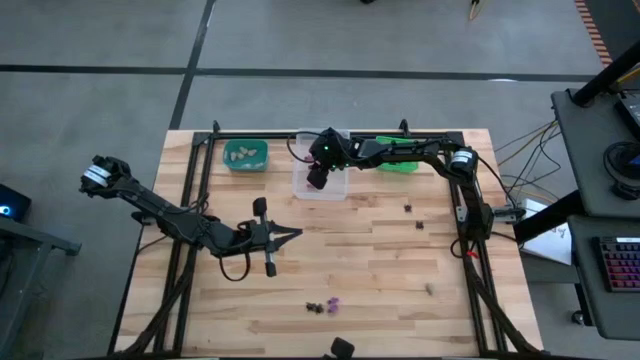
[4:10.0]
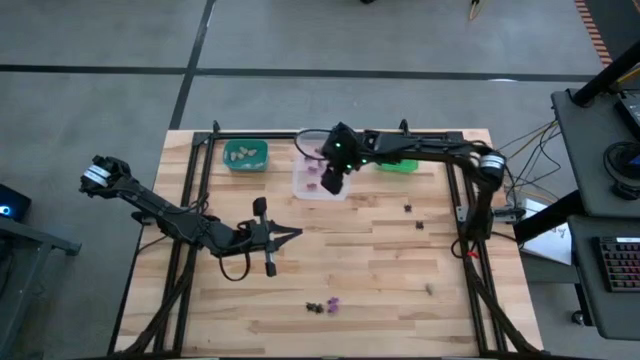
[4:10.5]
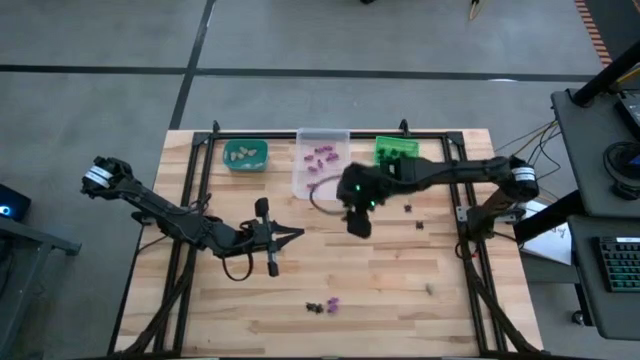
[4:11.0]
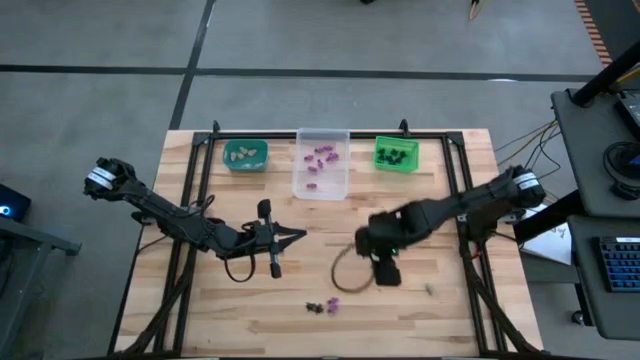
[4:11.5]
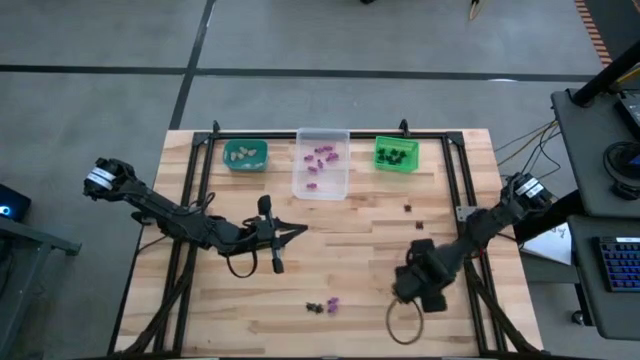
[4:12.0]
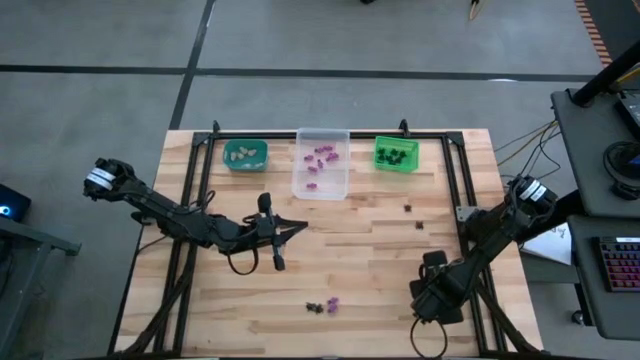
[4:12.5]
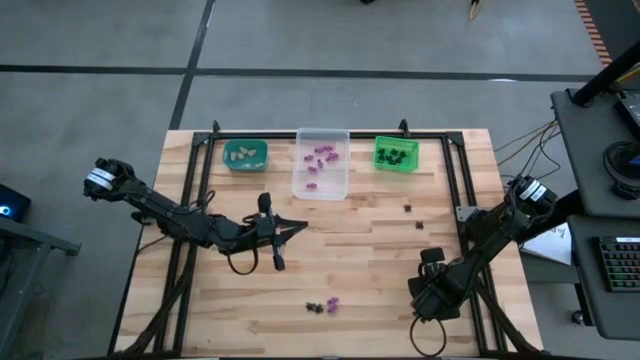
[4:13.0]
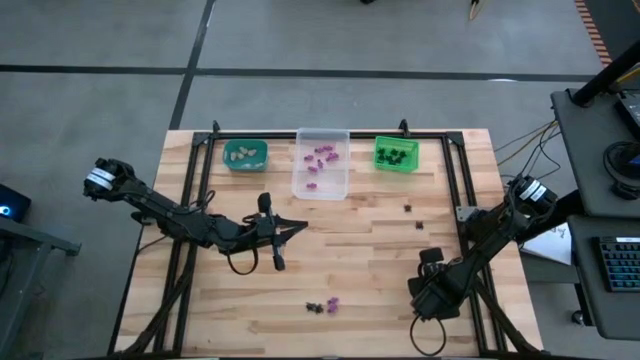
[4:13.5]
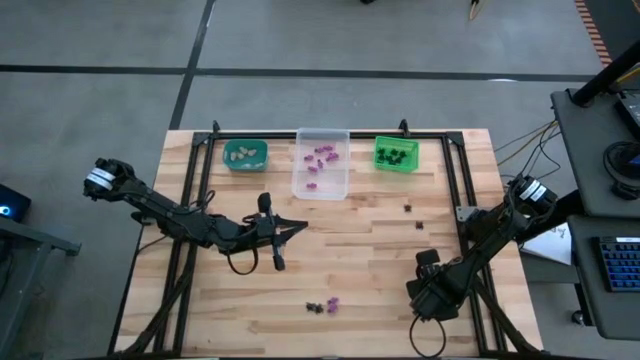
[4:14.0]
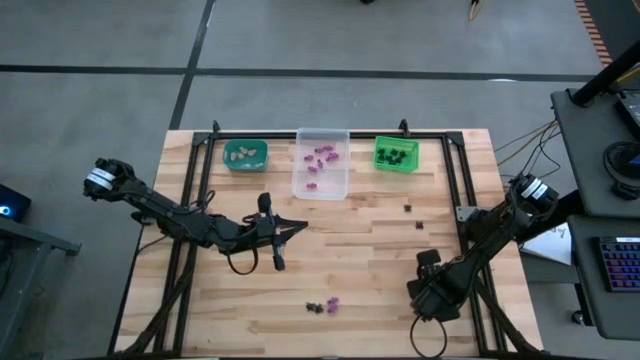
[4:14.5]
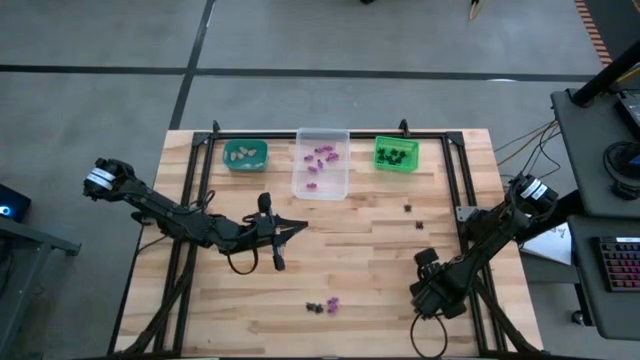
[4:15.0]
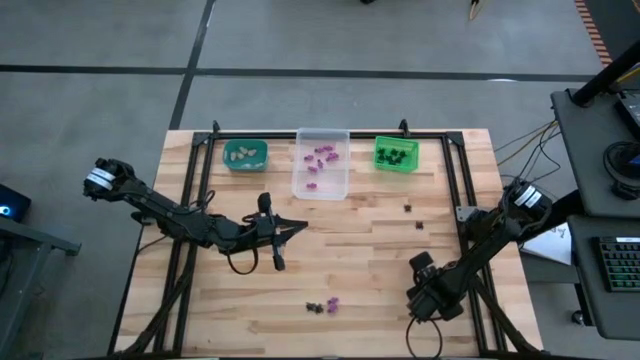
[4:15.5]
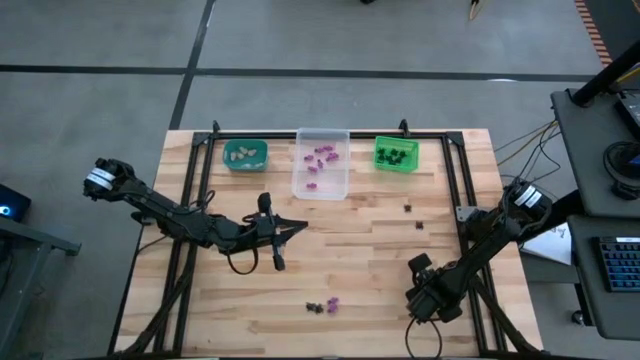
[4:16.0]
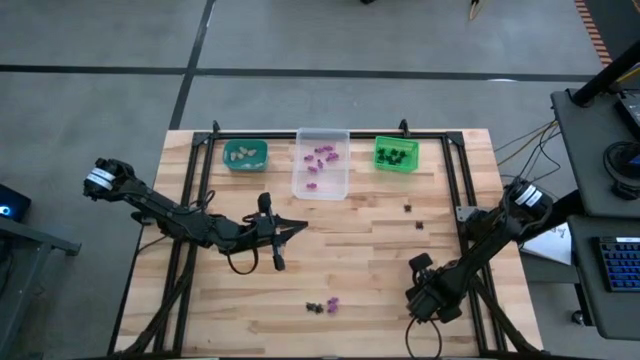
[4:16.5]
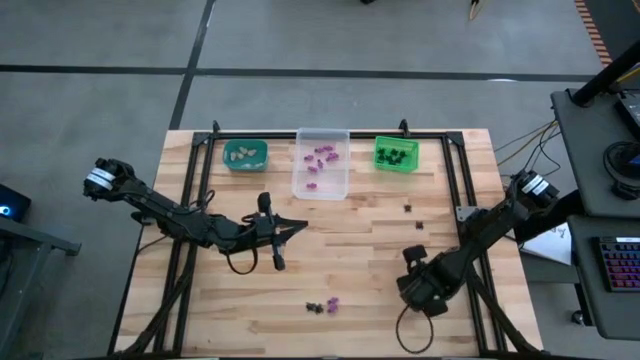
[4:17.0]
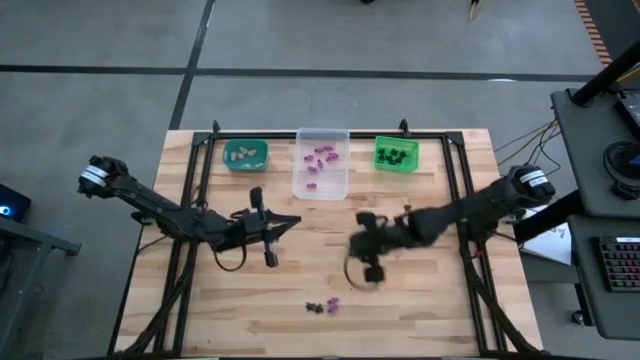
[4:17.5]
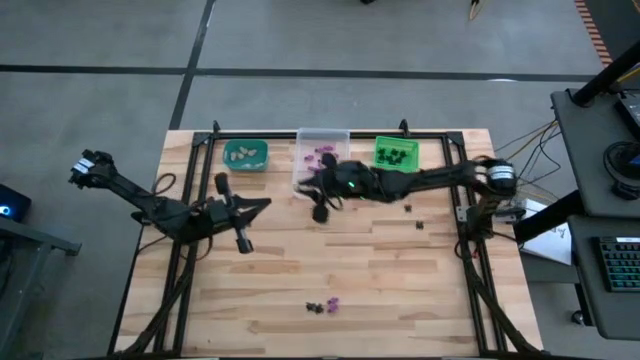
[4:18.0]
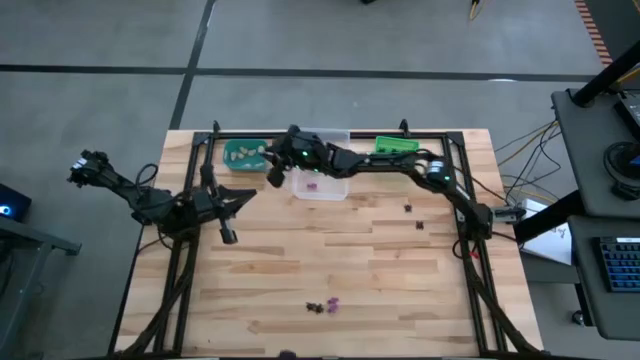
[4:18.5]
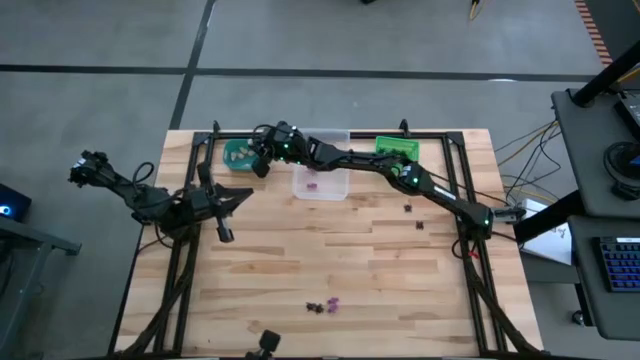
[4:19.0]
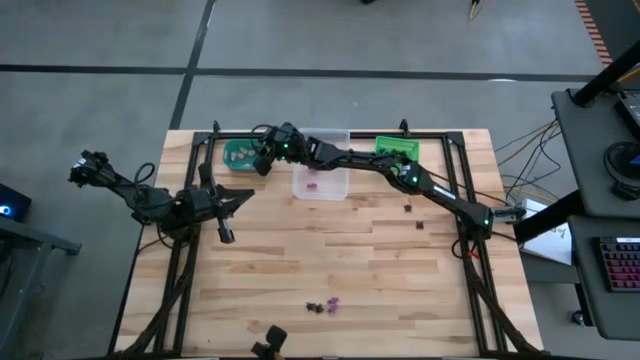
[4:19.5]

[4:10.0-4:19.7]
Task: Sort Halloween decoration
Put the white skull toy into the light blue bin

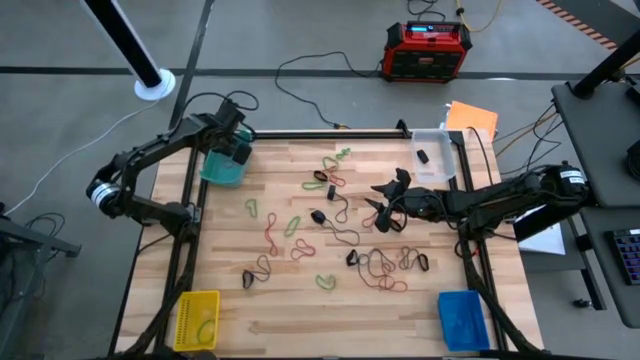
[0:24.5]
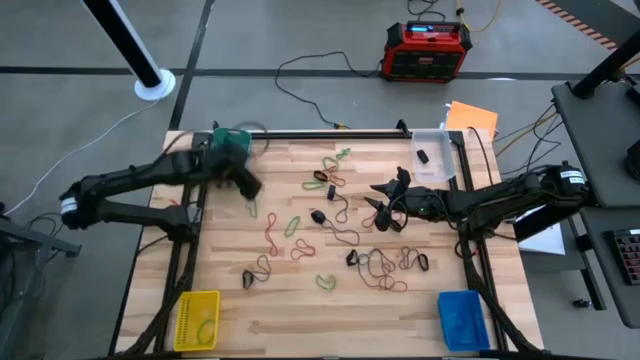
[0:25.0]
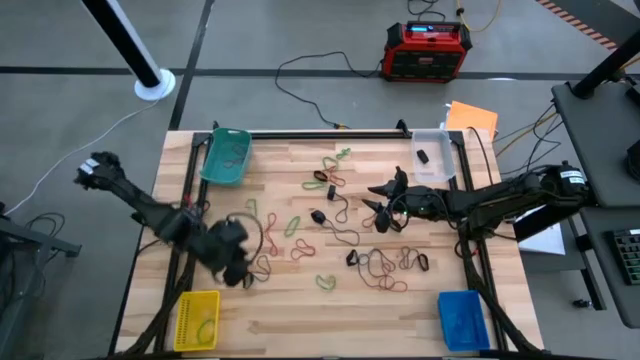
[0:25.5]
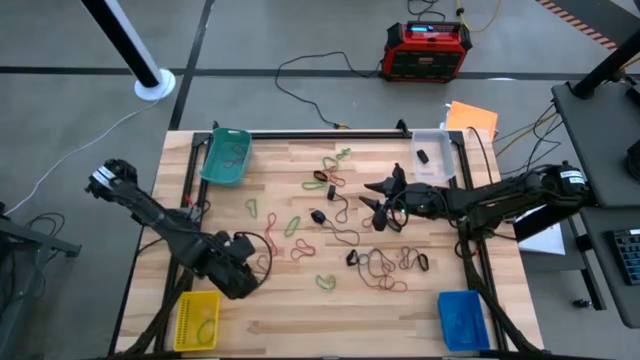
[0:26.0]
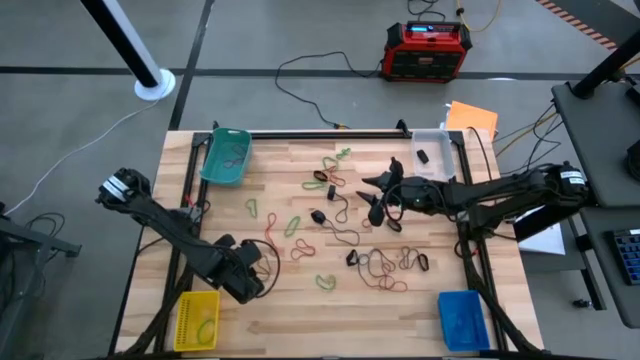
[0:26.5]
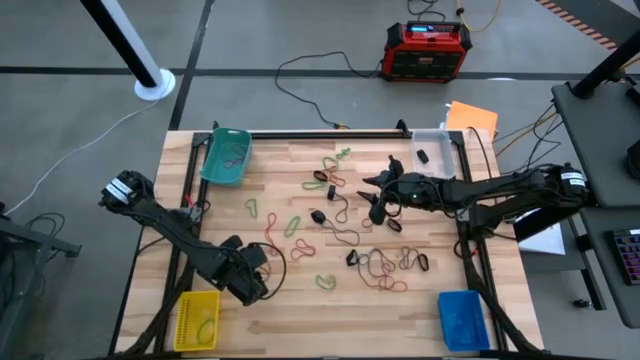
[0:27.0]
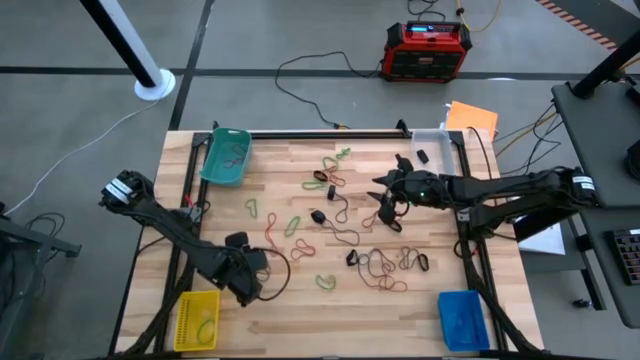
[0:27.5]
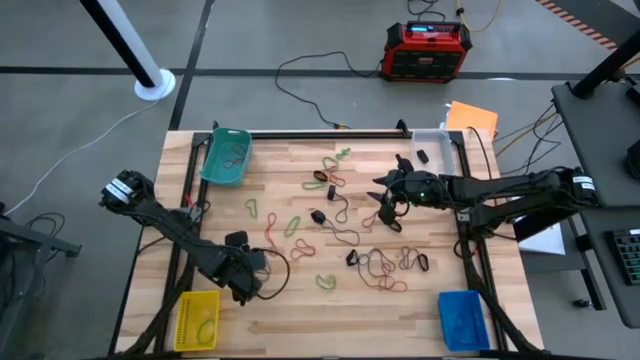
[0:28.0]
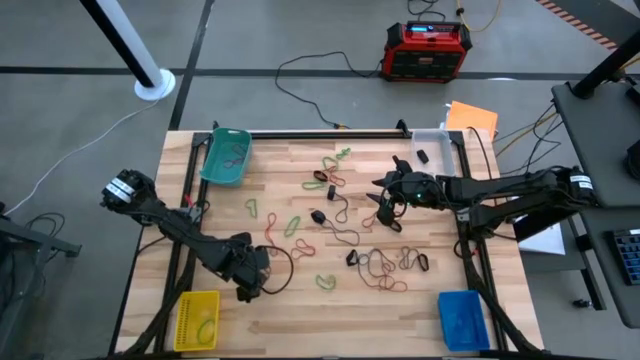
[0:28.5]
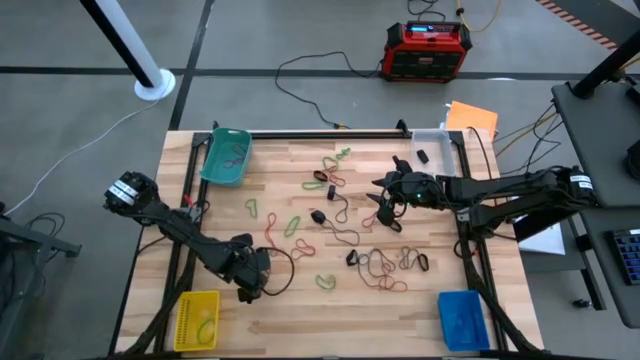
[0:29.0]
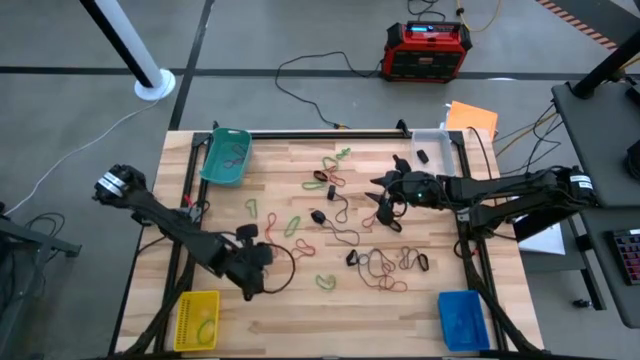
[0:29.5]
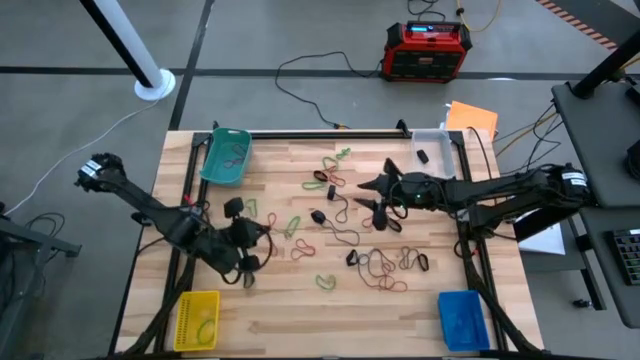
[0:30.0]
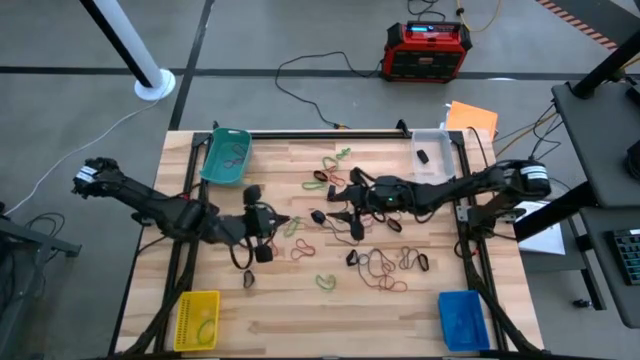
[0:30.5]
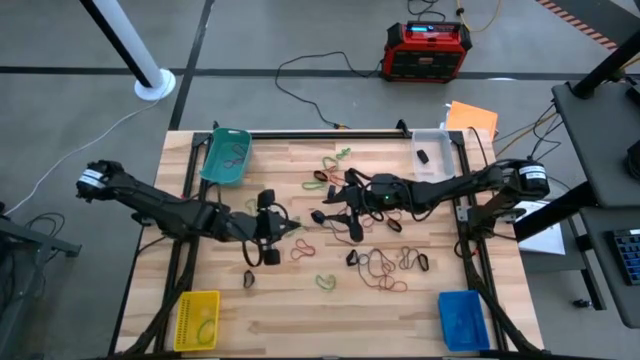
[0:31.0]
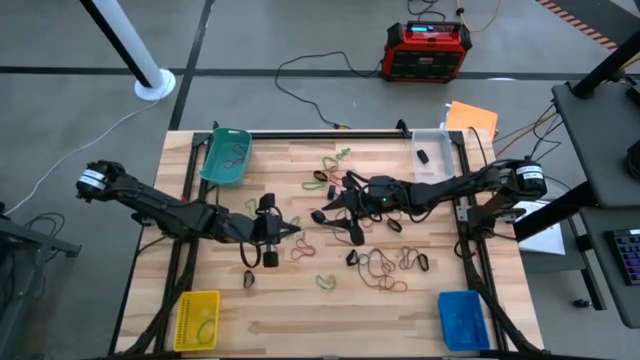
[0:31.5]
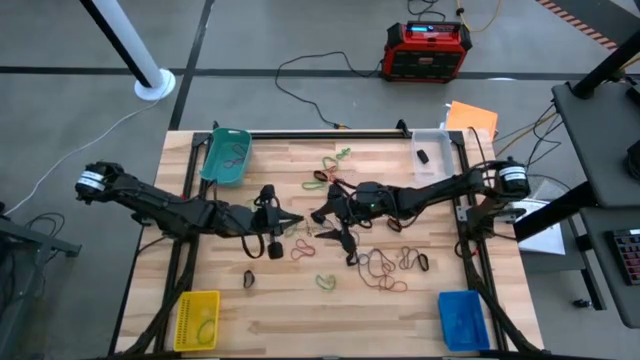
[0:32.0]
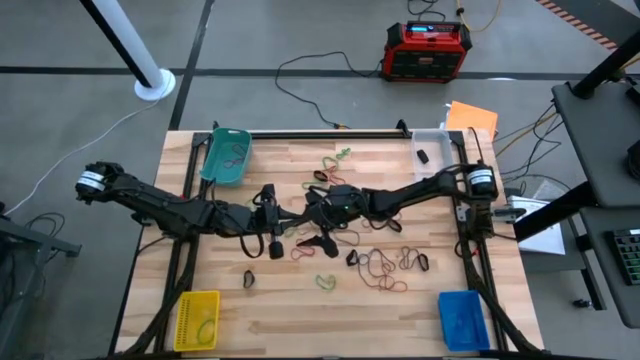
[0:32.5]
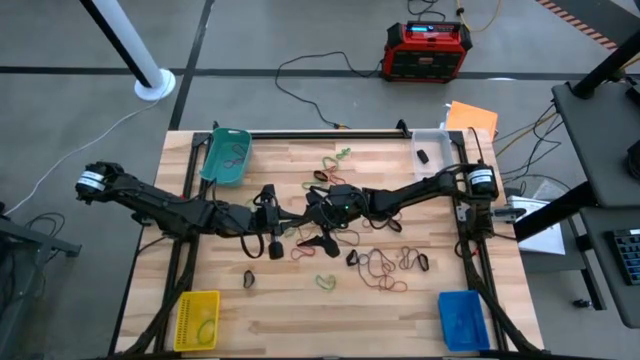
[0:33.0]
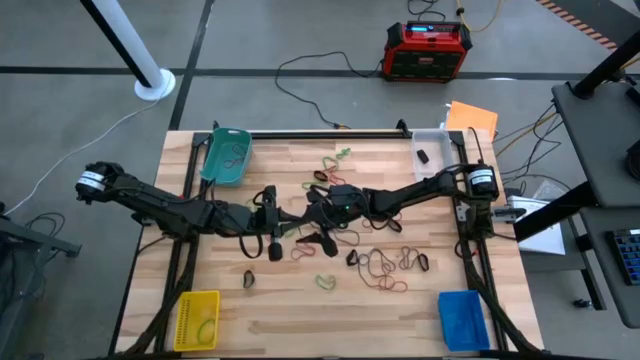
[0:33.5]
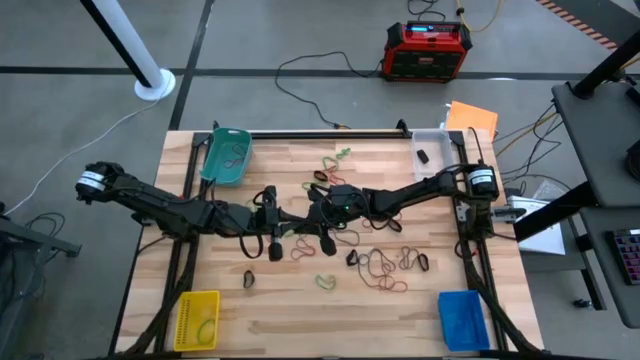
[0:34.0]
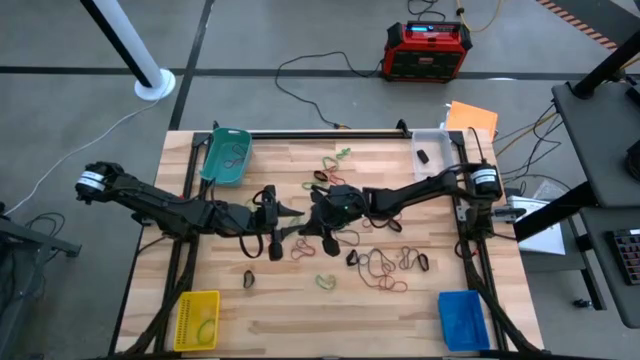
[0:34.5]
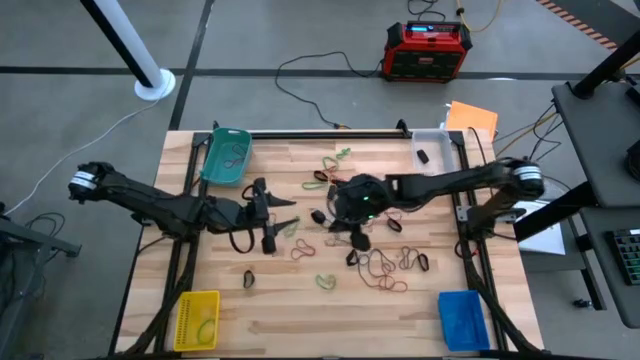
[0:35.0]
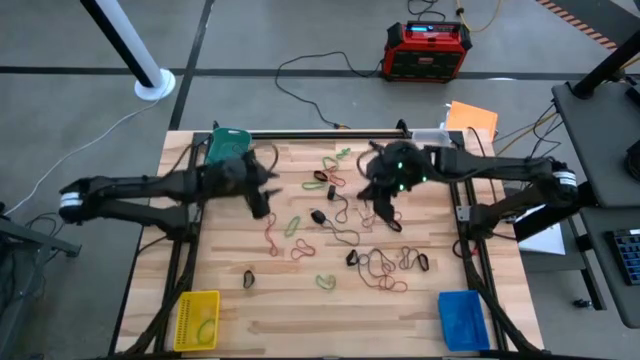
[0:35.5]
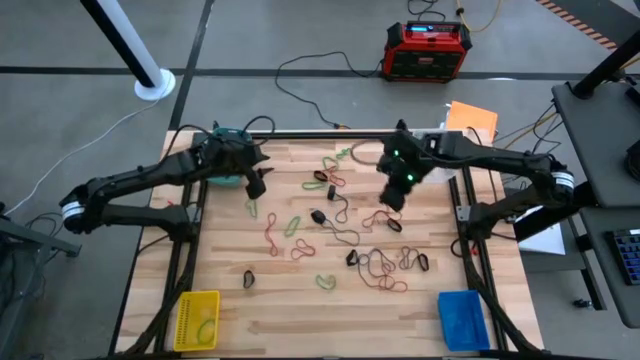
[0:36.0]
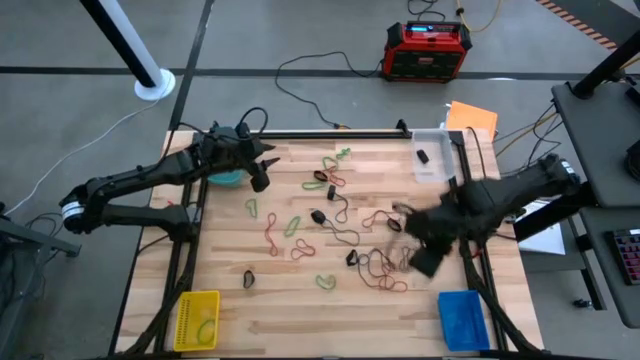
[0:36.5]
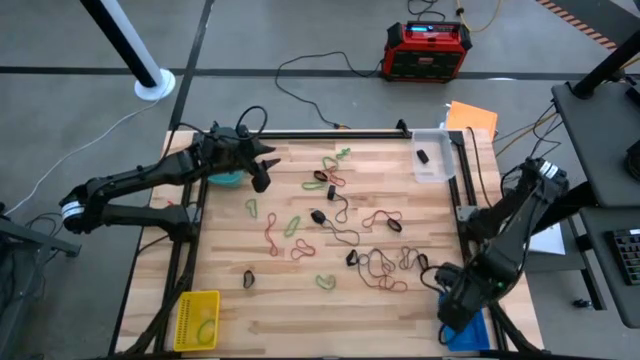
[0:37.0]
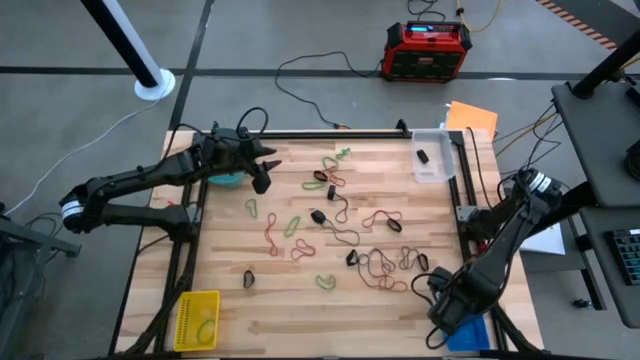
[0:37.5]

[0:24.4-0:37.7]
Task: Sort rubber bands into baskets
Put the violet rubber band into the blue bin
